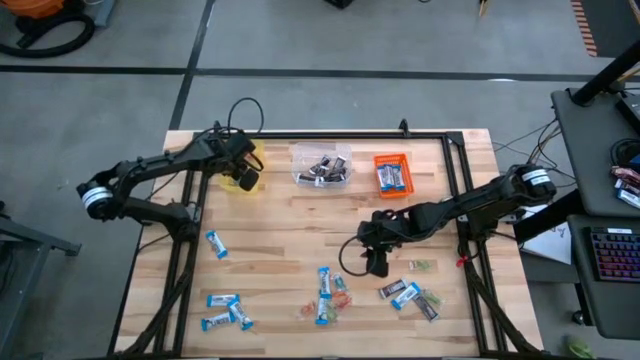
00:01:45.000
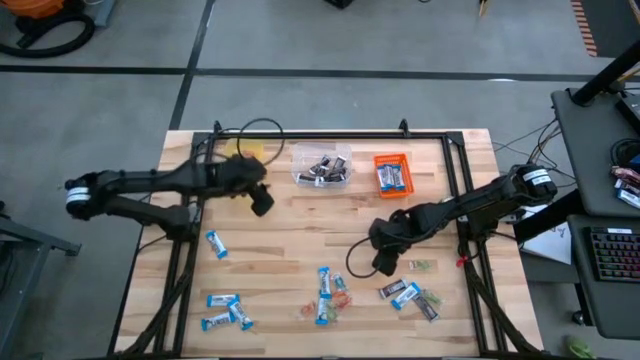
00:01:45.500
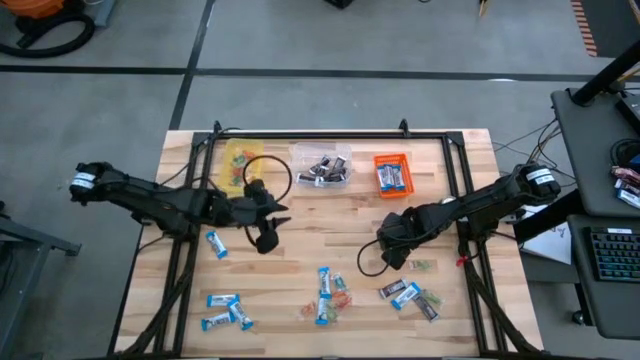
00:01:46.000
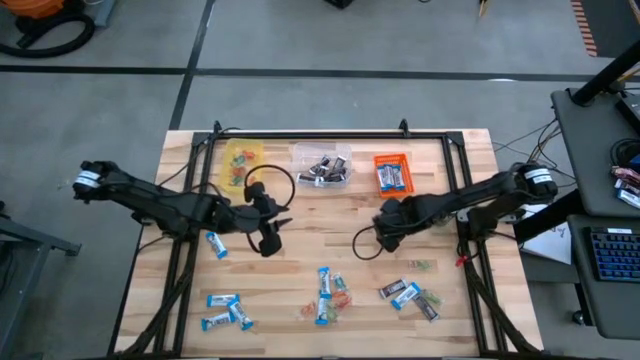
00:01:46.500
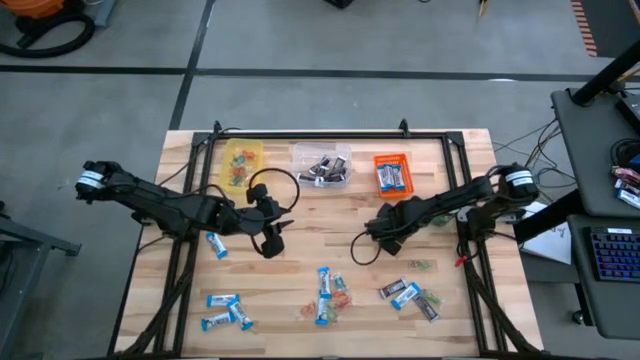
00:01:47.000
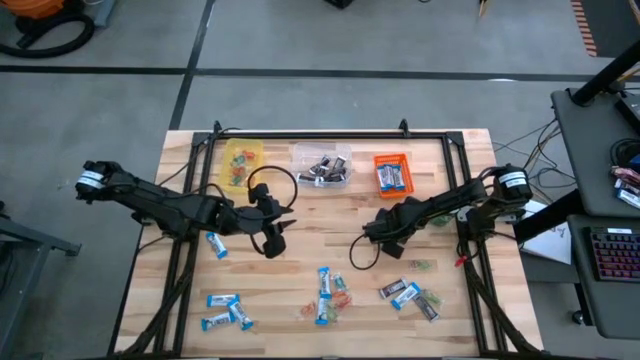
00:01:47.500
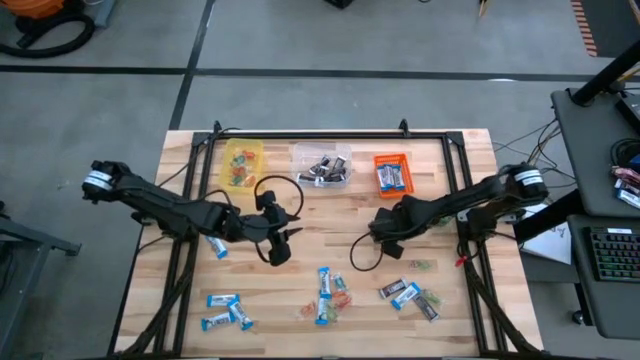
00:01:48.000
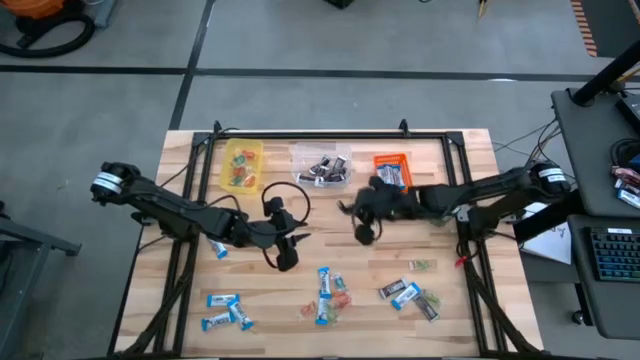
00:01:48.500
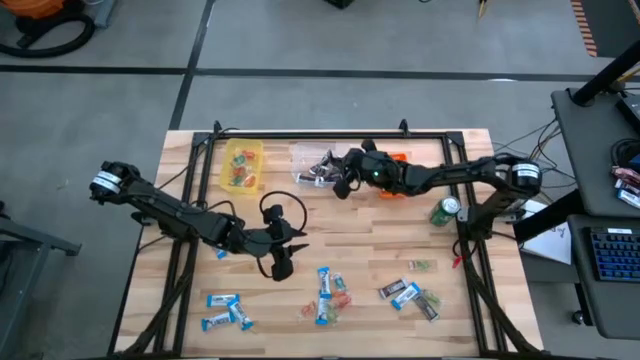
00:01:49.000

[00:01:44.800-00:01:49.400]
Task: Organize candy in baskets
Put the brown chocolate bar into the transparent bin

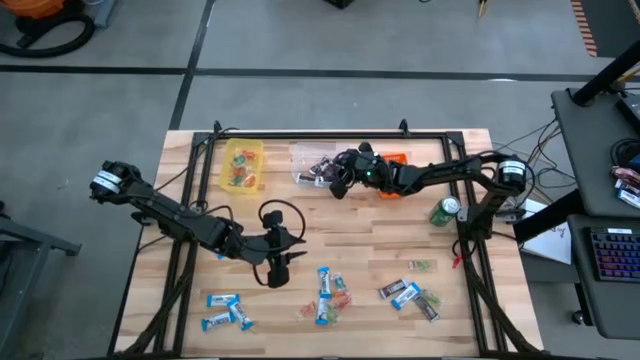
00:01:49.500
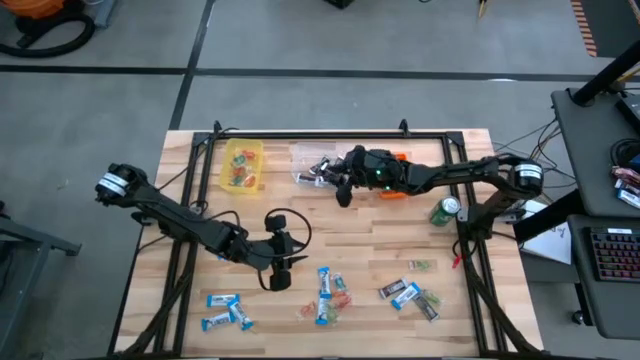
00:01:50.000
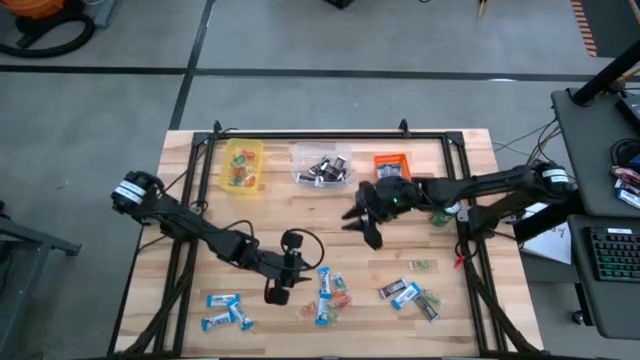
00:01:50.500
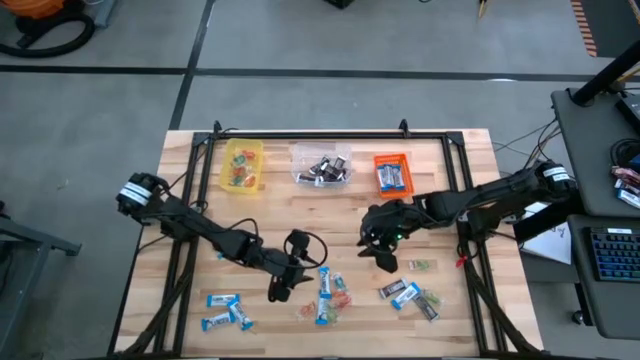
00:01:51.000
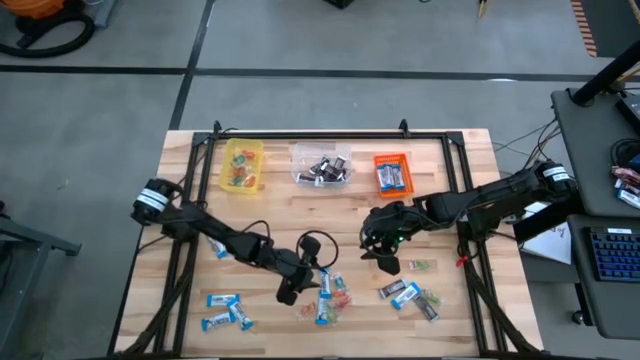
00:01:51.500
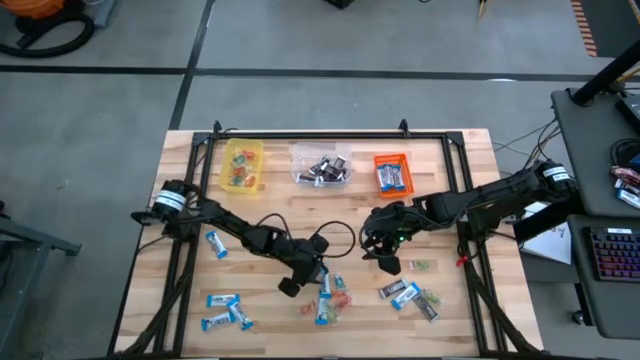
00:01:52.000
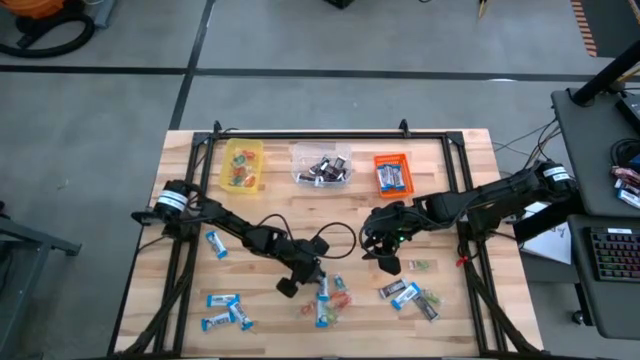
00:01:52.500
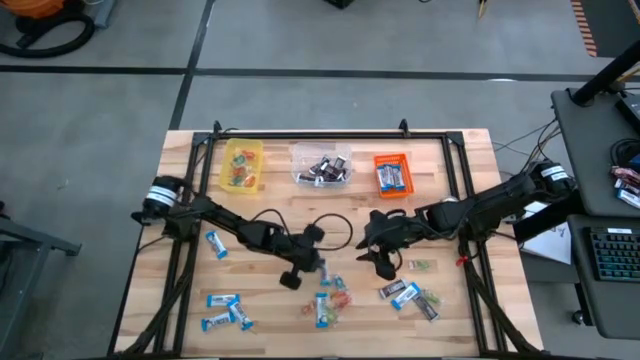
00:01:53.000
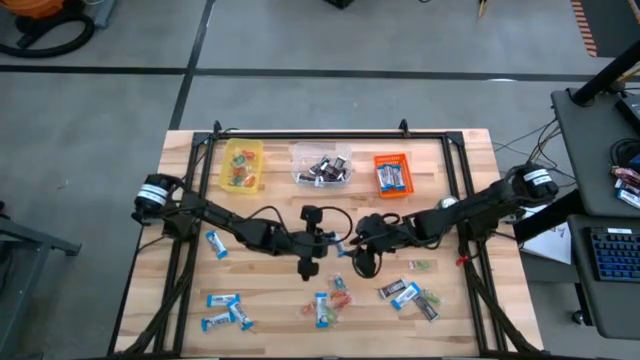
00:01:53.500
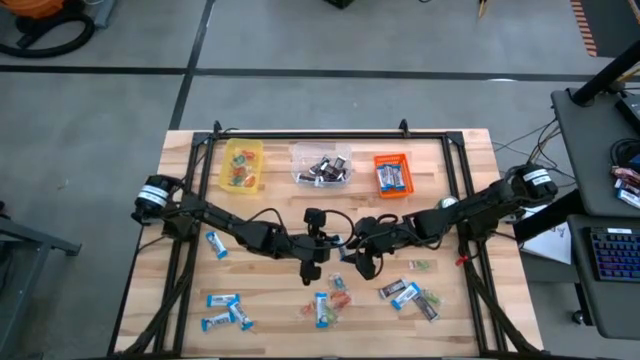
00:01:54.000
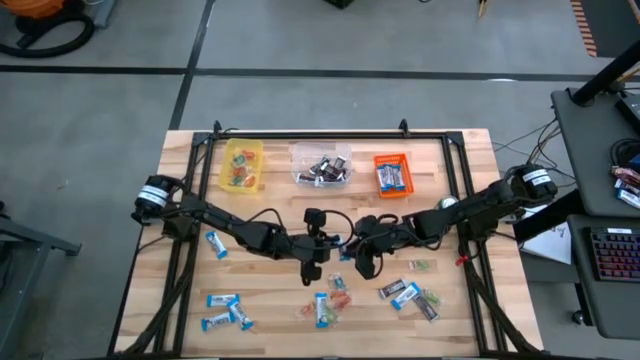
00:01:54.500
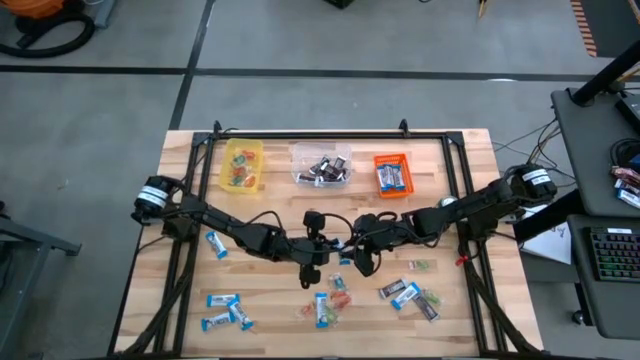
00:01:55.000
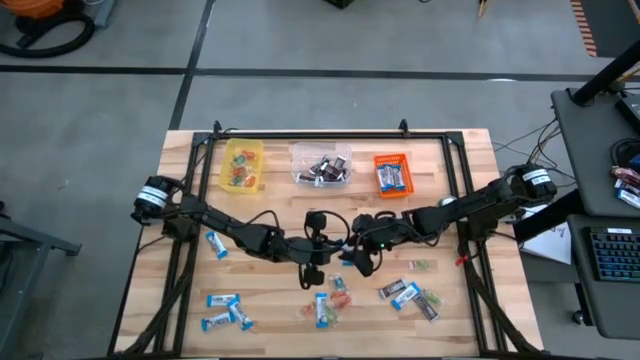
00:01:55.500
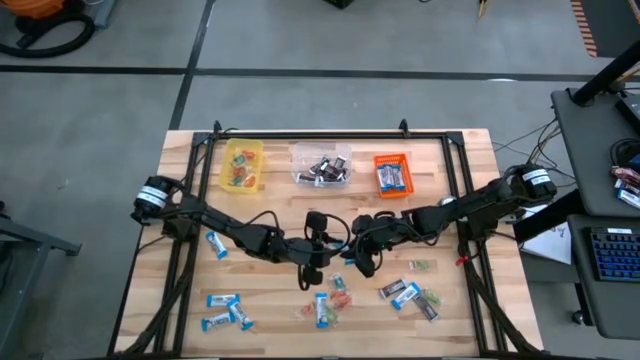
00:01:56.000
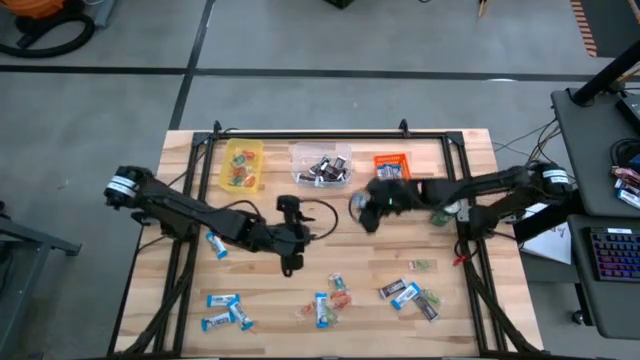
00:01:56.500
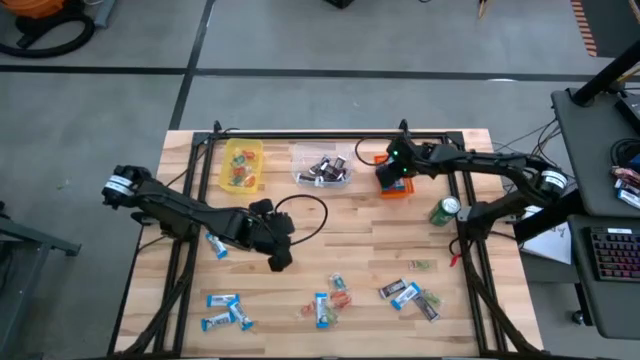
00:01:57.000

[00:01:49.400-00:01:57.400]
Put the white chocolate bar chocolate into the orange bin

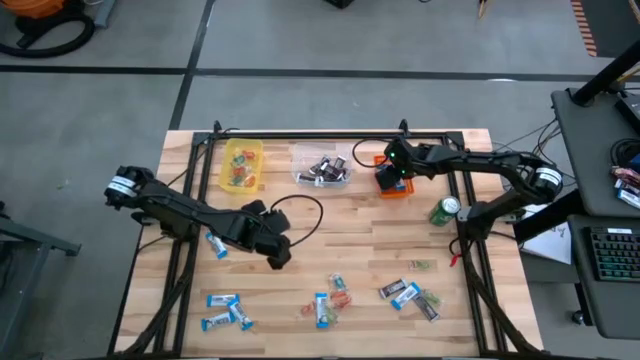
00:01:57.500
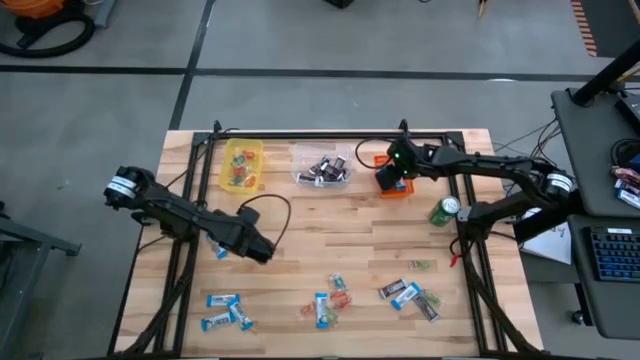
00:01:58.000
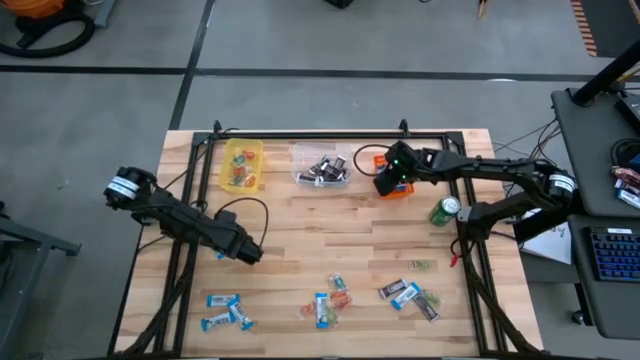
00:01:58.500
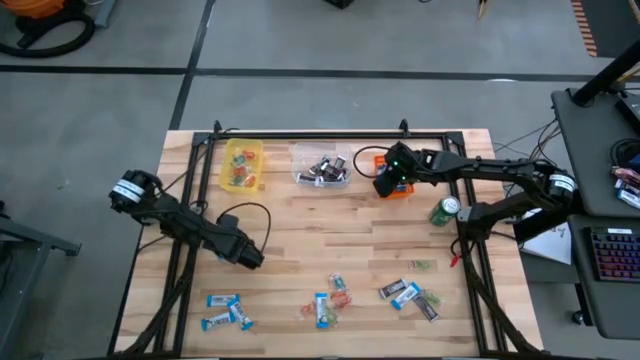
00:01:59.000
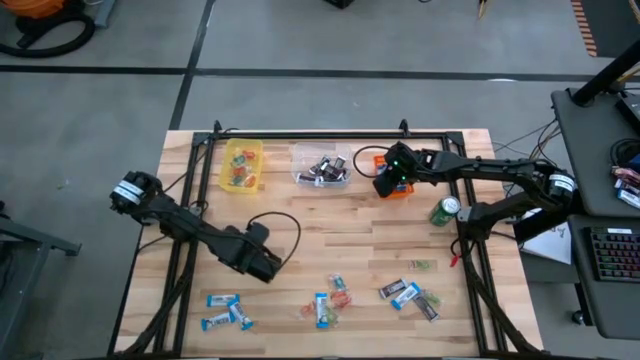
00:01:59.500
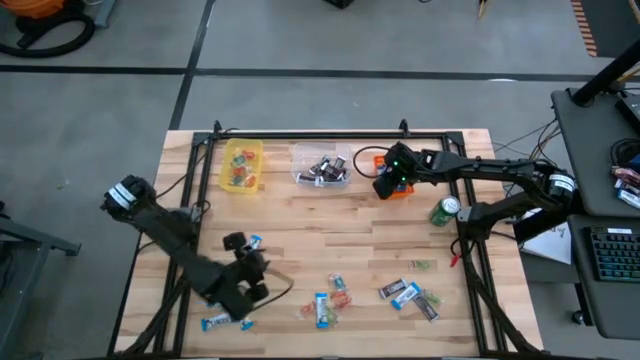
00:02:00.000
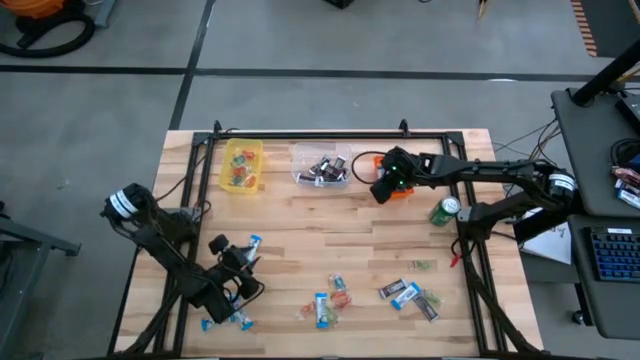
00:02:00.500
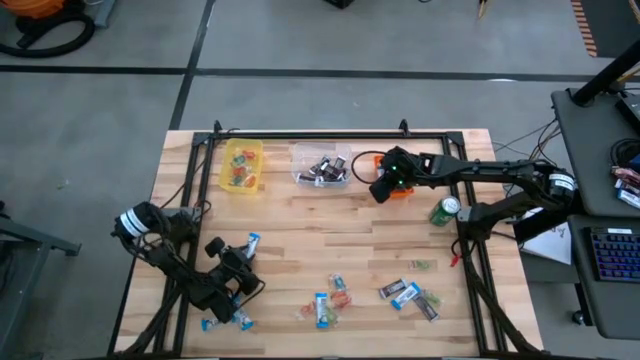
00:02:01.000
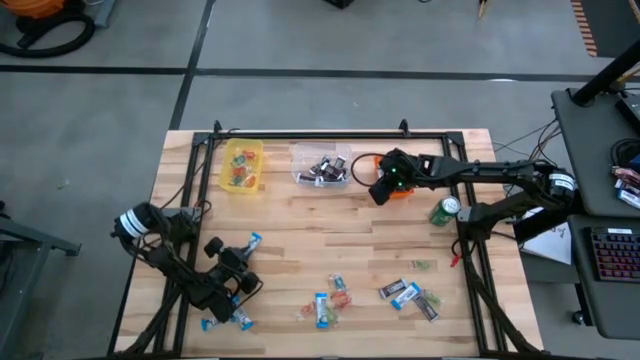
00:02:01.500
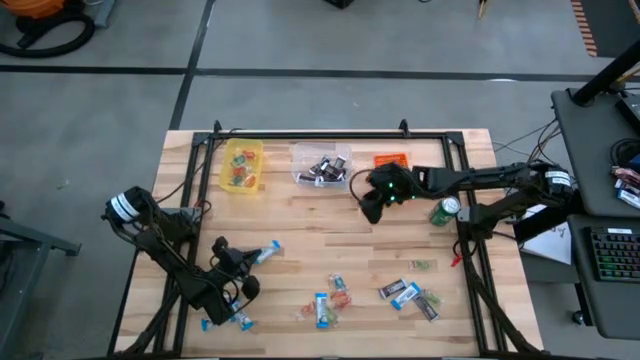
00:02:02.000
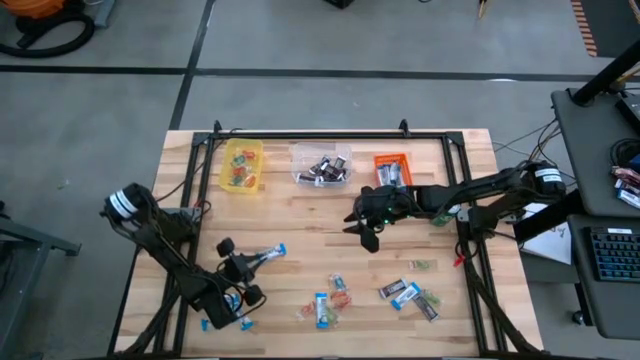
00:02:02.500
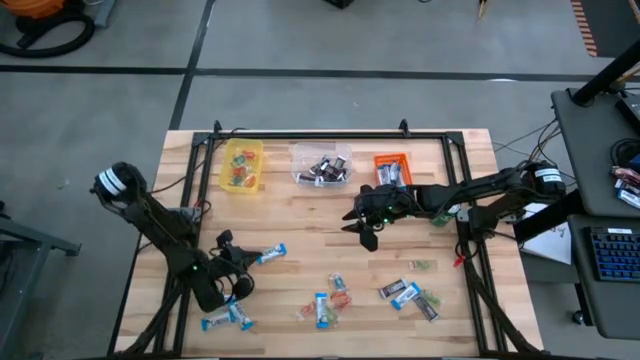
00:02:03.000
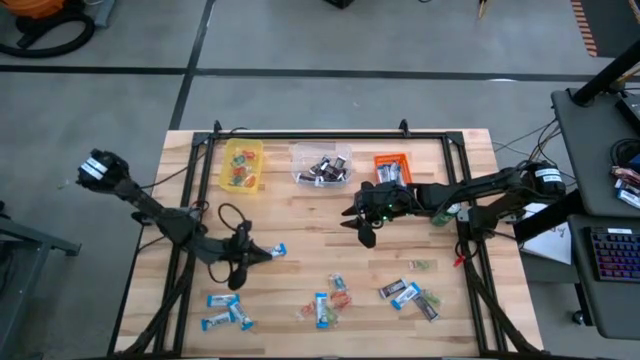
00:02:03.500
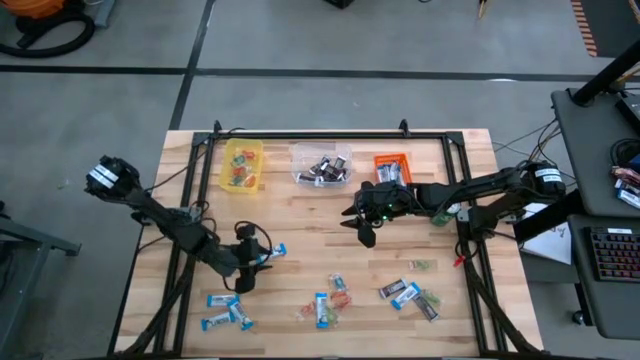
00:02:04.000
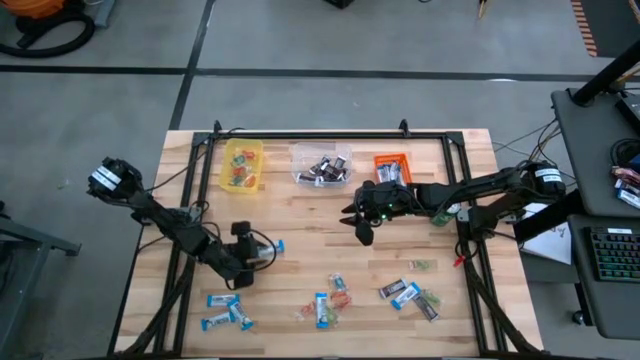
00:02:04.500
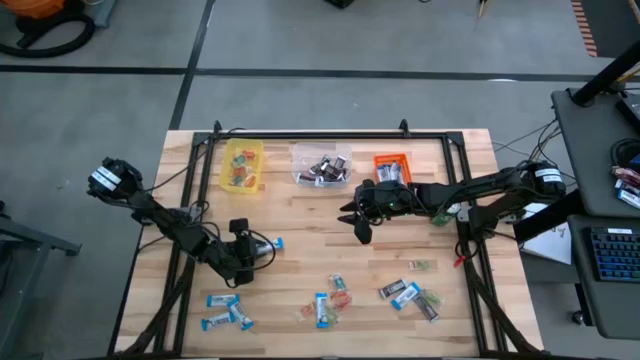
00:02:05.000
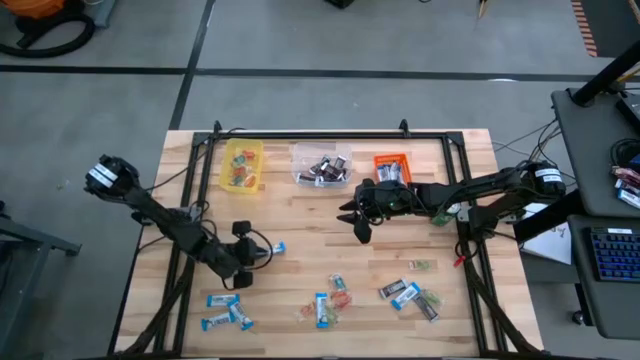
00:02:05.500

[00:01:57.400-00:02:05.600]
Put the white chocolate bar chocolate into the orange bin

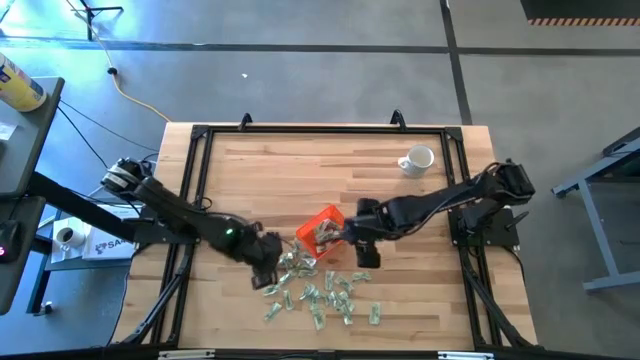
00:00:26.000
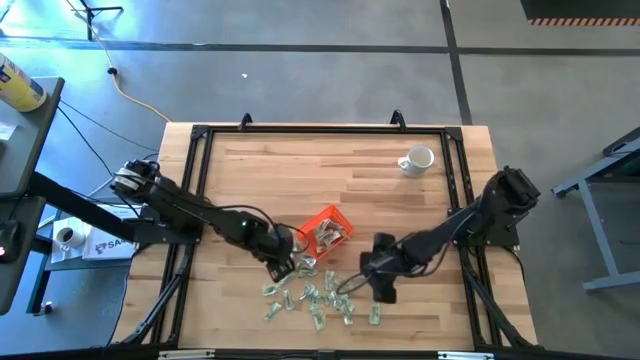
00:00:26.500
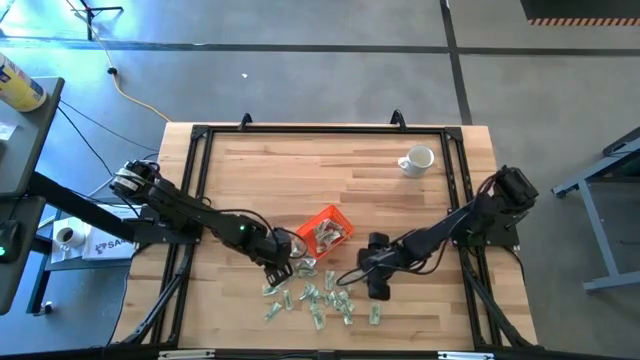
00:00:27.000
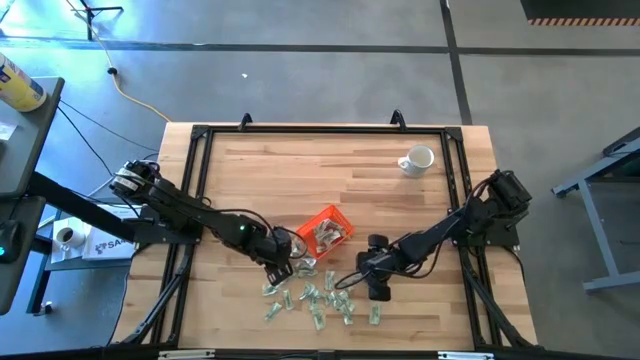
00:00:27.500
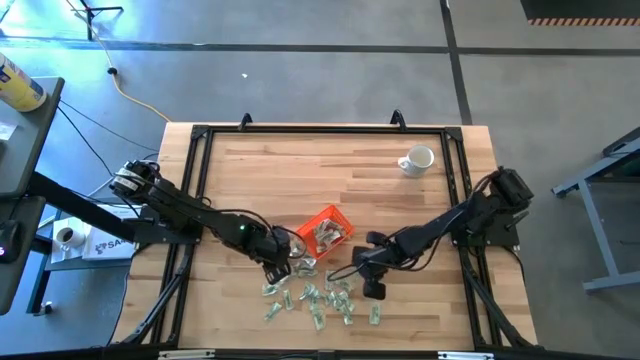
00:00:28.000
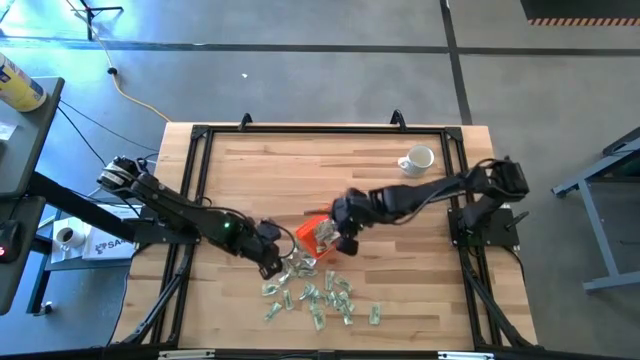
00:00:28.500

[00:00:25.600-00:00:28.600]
Task: Pick and place Stevia / Truvia into bins
Put the stevia packet into the orange bin
